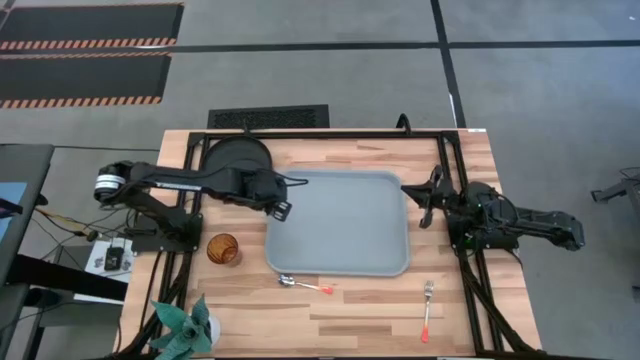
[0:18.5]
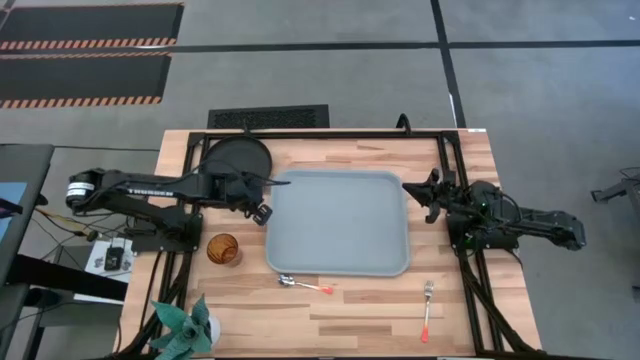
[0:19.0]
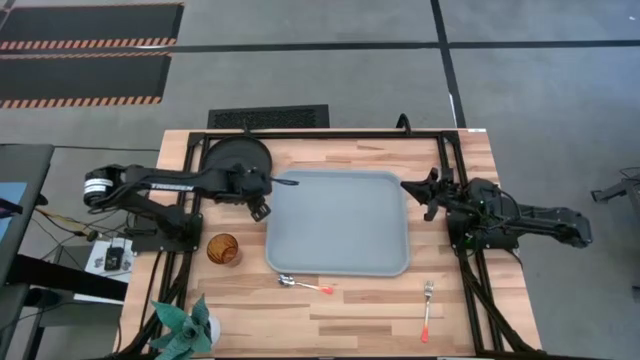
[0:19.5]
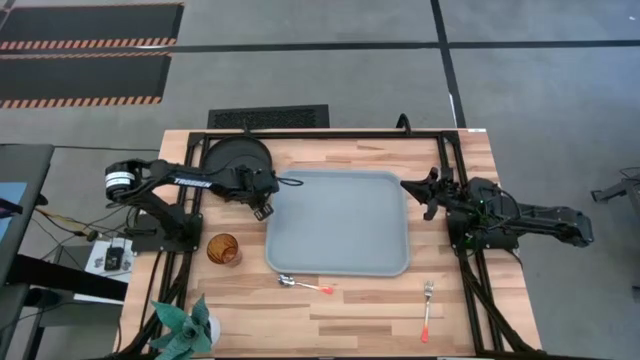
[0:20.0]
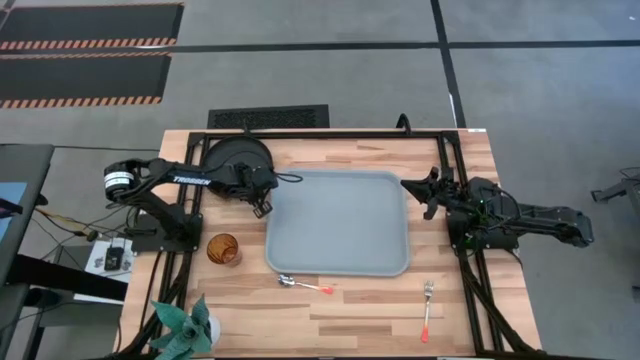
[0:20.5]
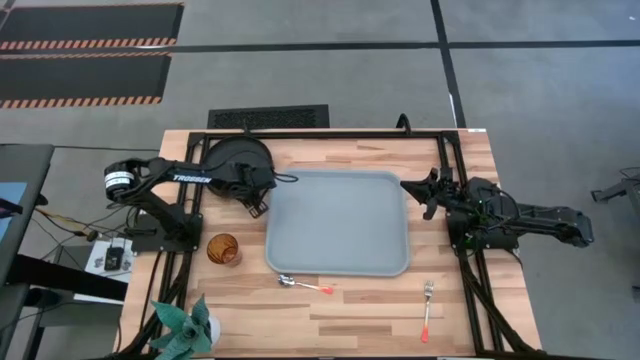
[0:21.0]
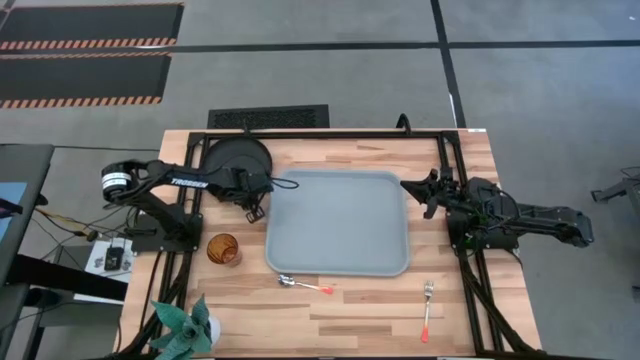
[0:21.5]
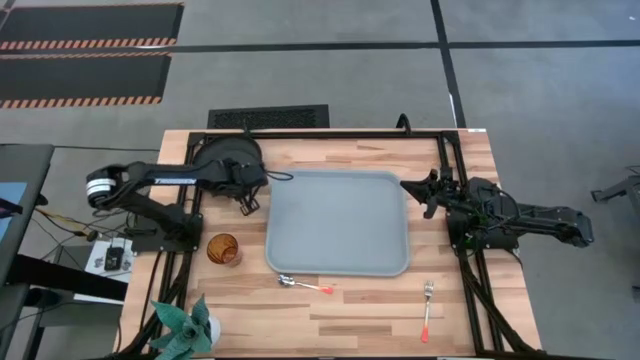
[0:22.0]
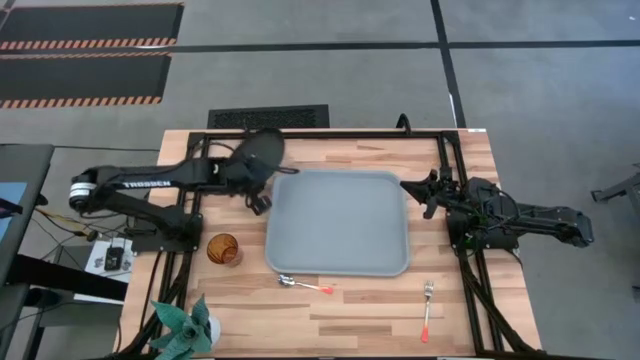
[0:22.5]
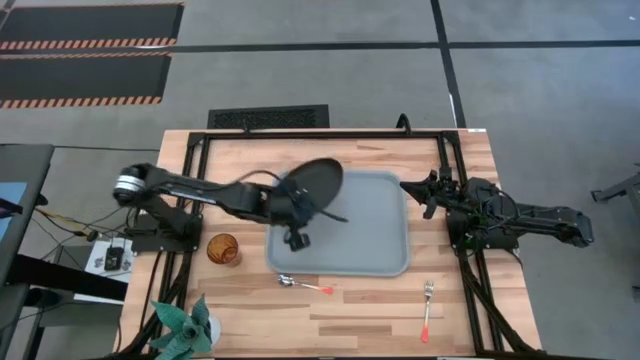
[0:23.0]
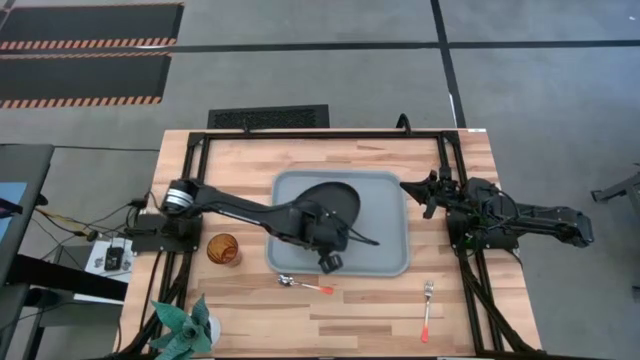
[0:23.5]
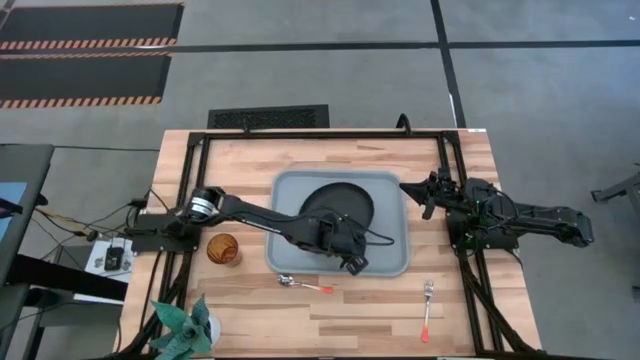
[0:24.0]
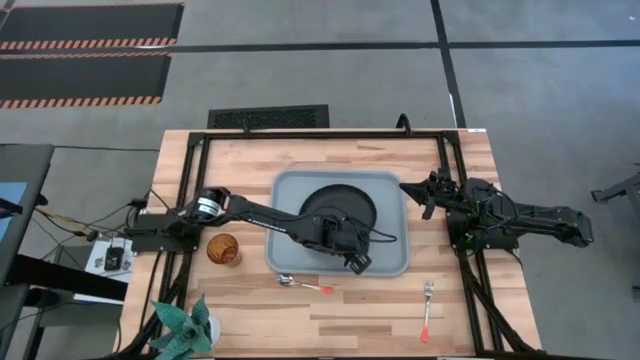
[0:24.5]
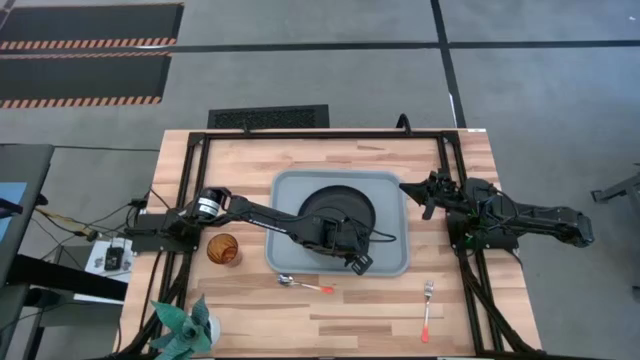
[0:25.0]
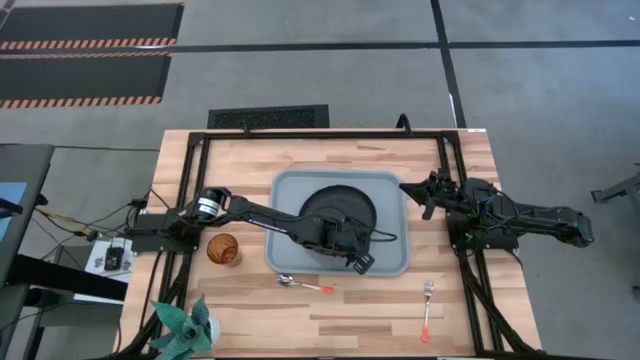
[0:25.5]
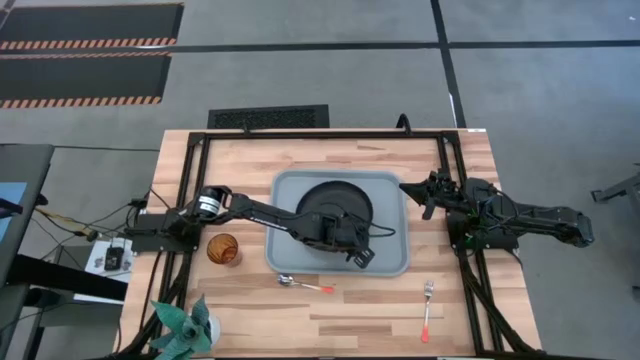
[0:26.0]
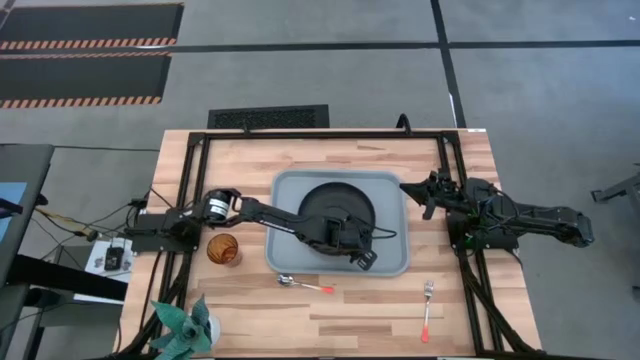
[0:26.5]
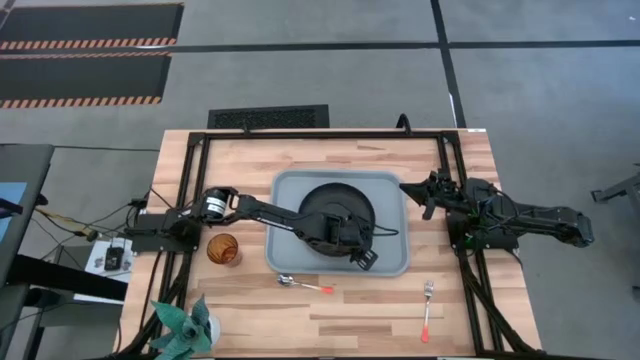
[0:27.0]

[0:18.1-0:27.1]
Task: Pick and place plate/cup/fork/spoon on tray
Put the black plate in the center of the gray tray

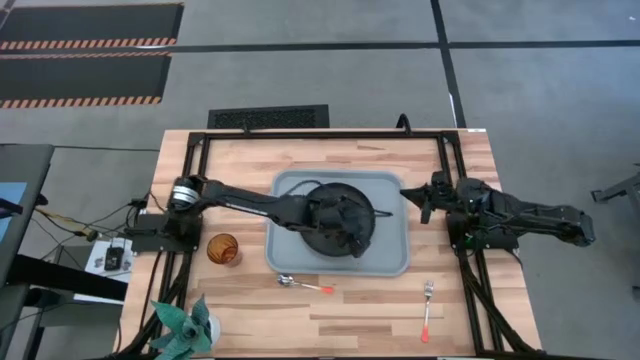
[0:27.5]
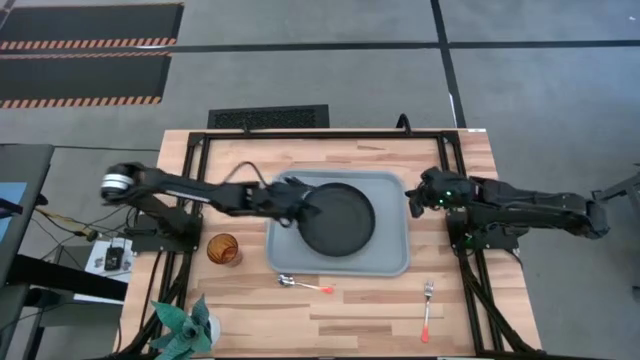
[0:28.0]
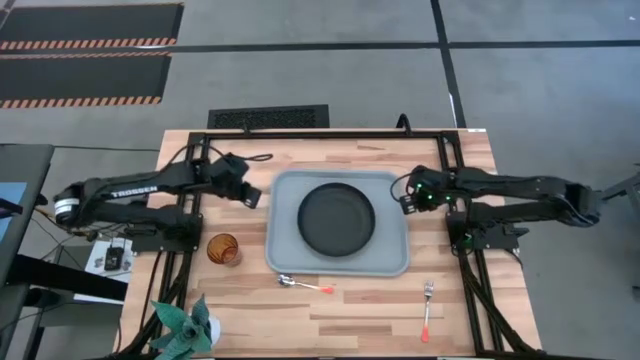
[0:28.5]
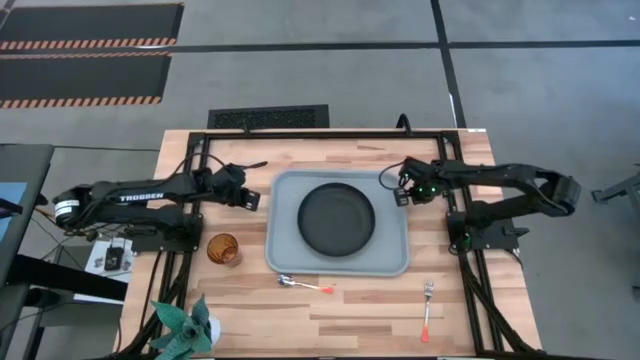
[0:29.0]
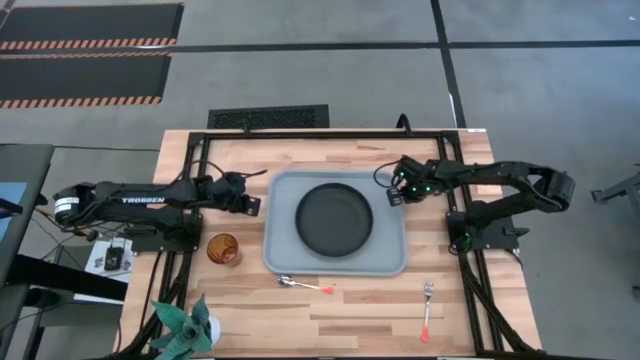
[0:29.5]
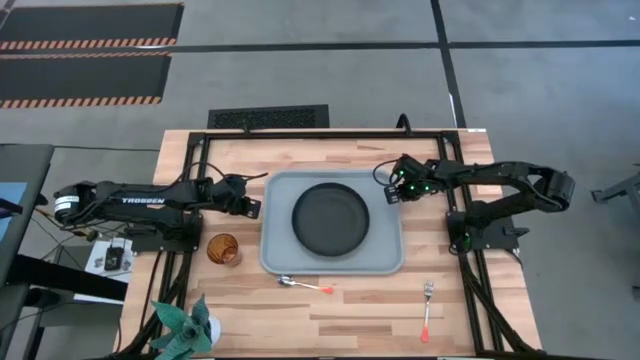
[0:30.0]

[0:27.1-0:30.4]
Adjust the gray tray

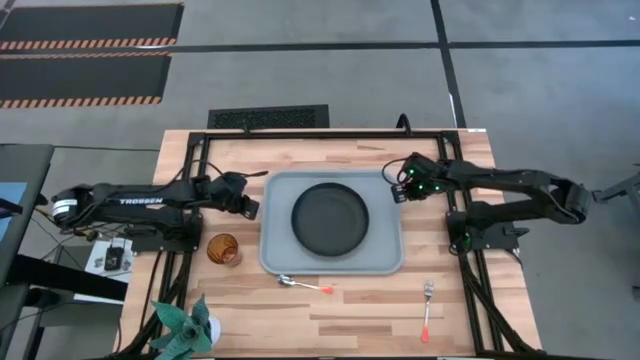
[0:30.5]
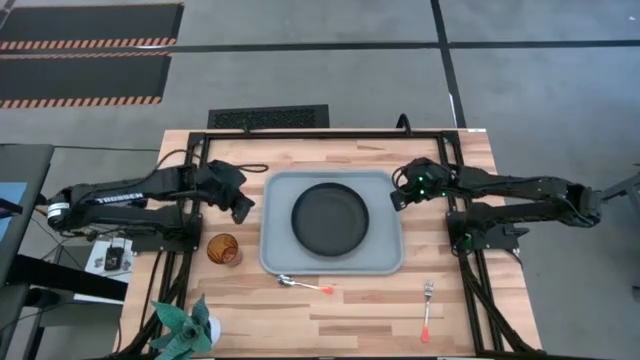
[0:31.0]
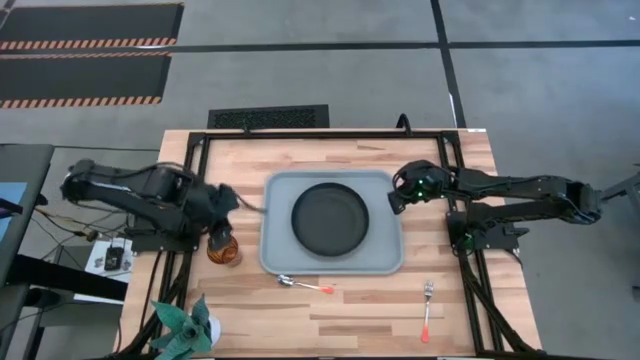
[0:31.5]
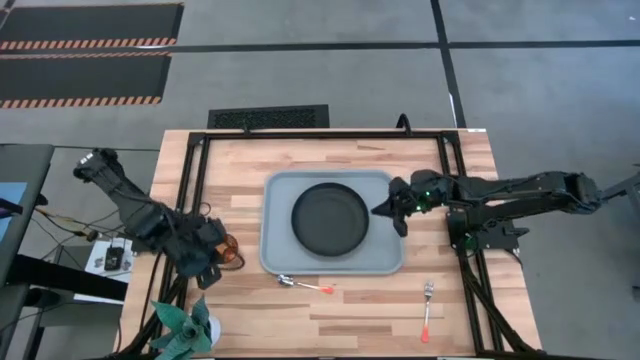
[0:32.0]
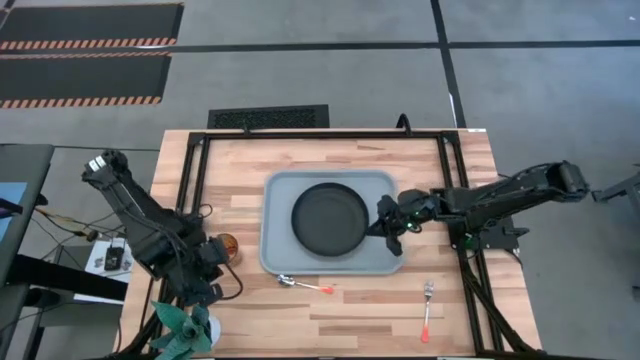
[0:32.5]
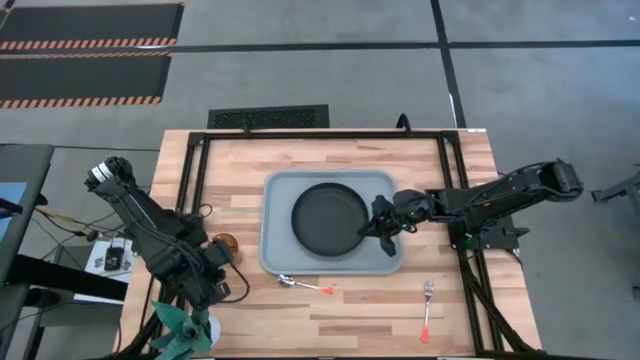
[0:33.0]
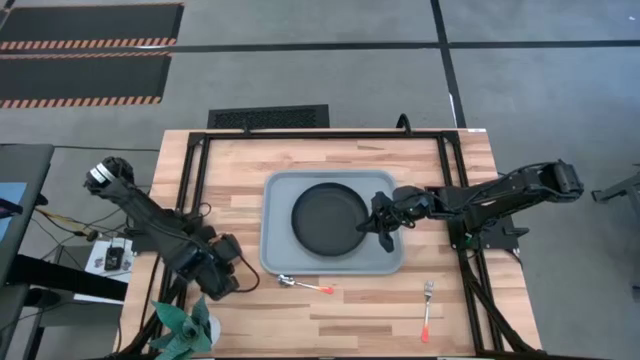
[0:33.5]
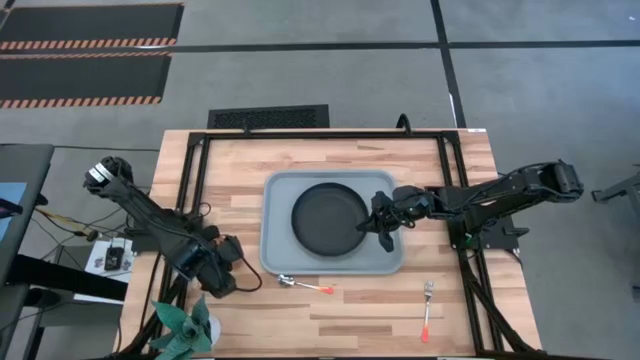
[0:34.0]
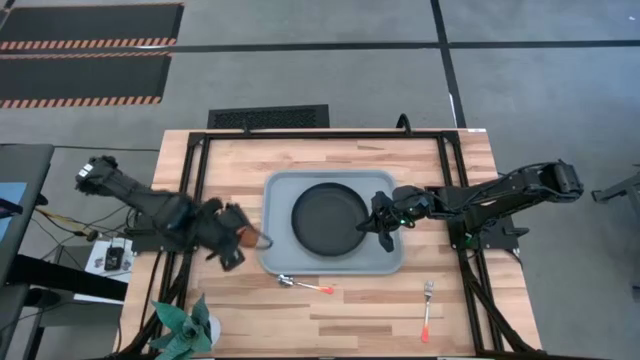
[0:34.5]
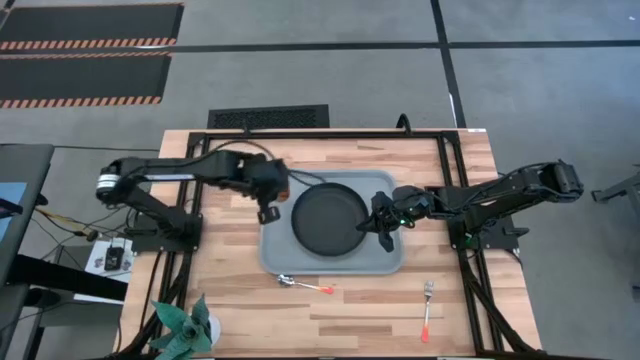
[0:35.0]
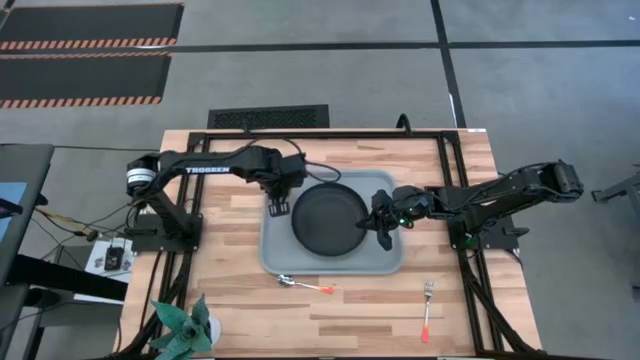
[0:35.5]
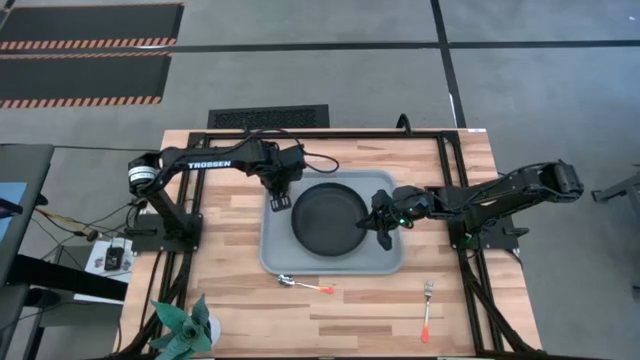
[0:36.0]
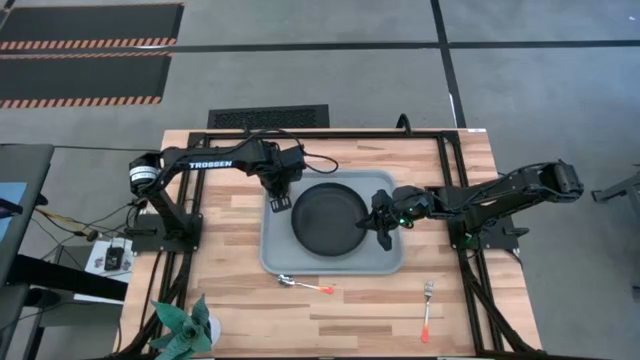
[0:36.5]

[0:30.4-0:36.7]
Put the brown cup on the gray tray to the top left of the black plate

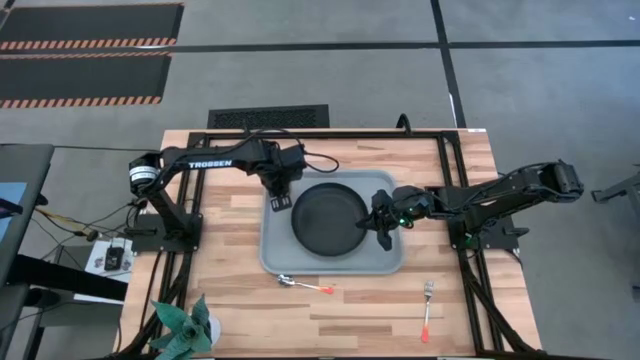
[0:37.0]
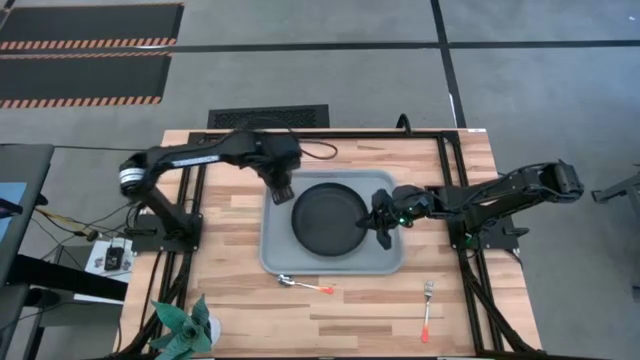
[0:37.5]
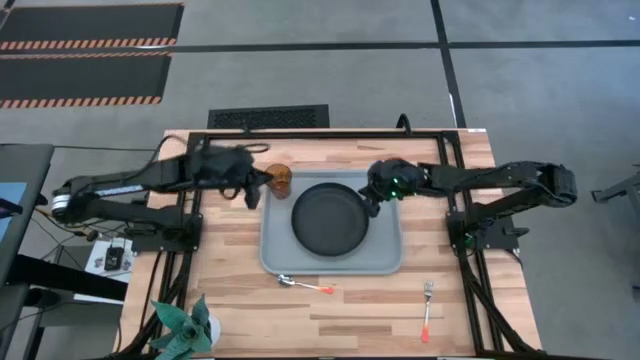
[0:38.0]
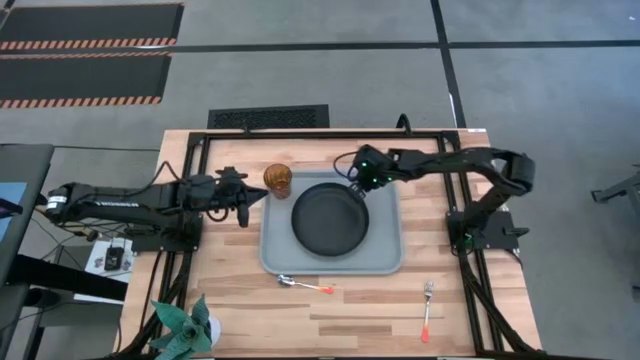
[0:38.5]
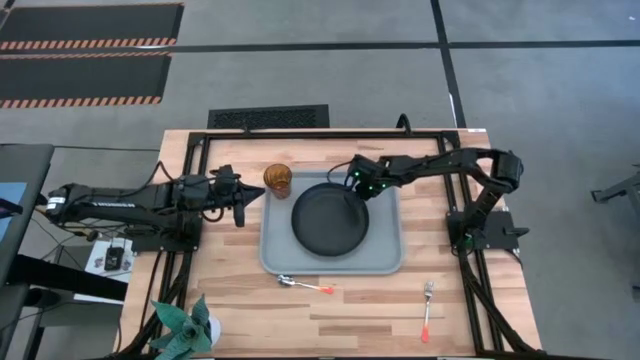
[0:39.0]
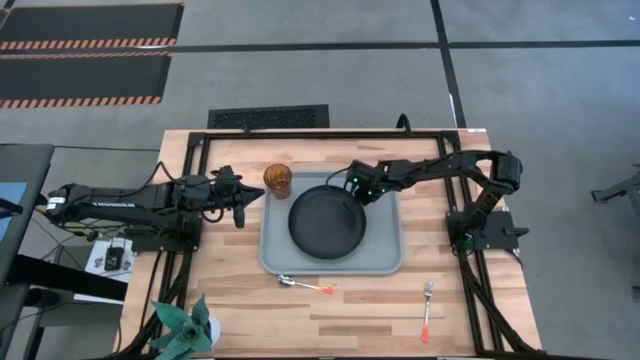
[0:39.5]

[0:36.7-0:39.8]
Adjust the black plate on the gray tray
